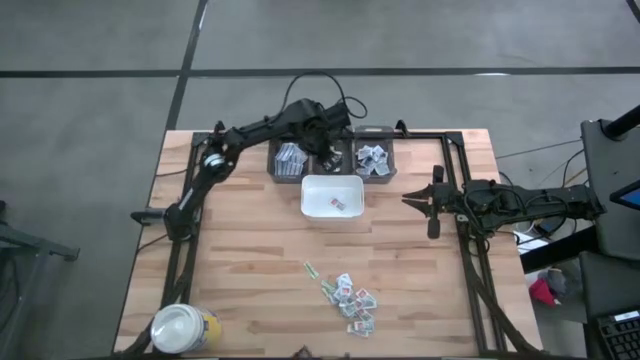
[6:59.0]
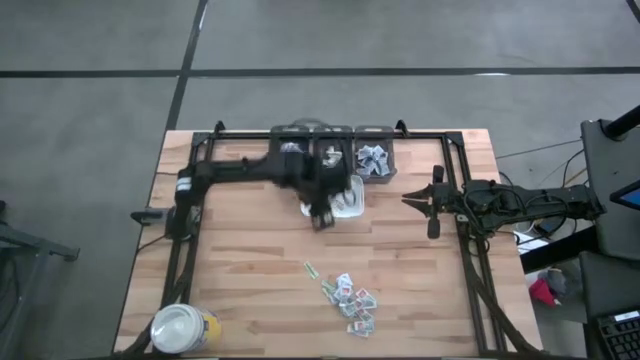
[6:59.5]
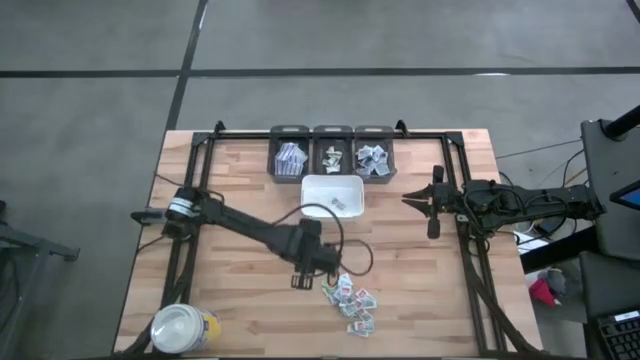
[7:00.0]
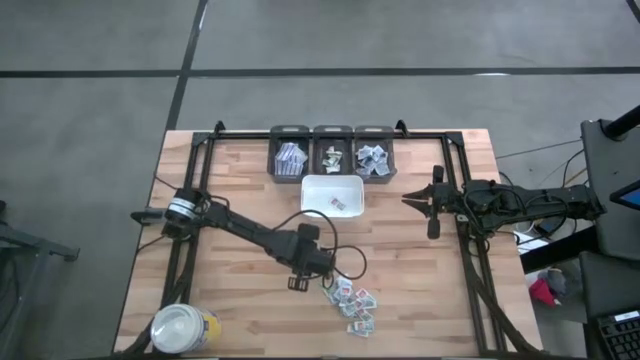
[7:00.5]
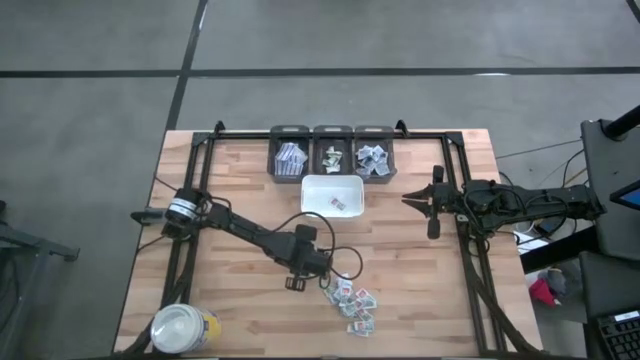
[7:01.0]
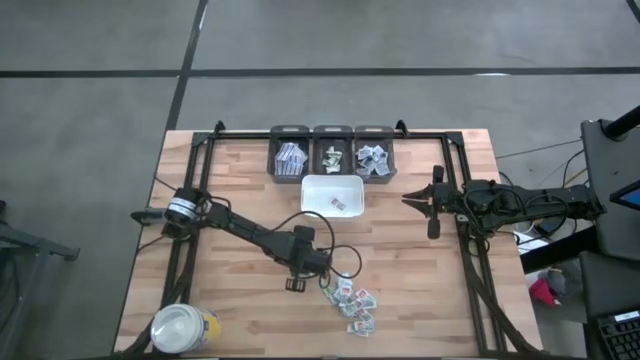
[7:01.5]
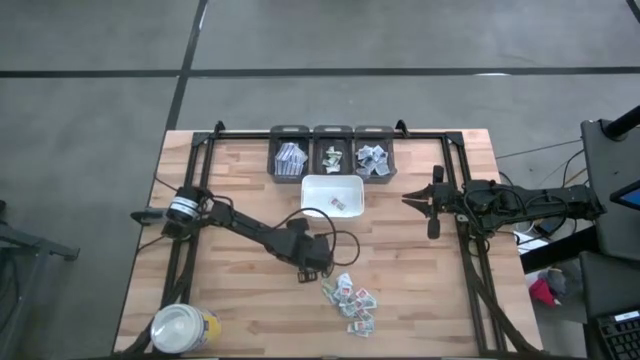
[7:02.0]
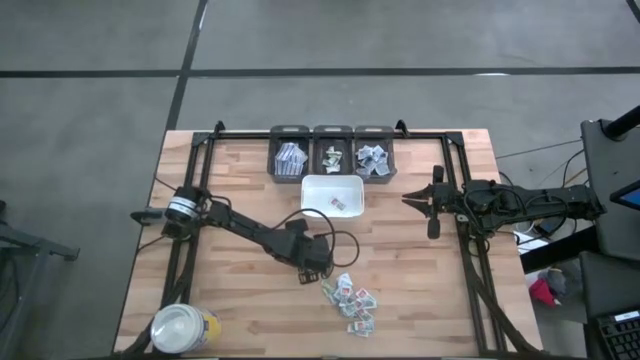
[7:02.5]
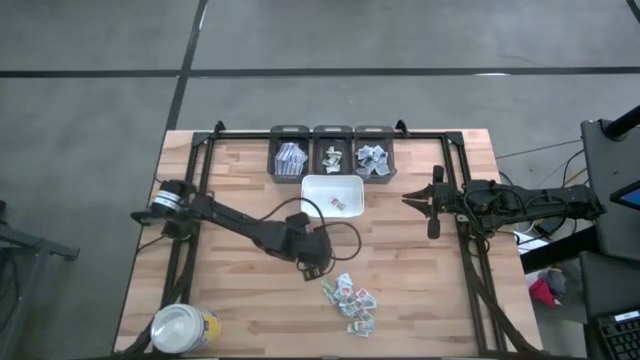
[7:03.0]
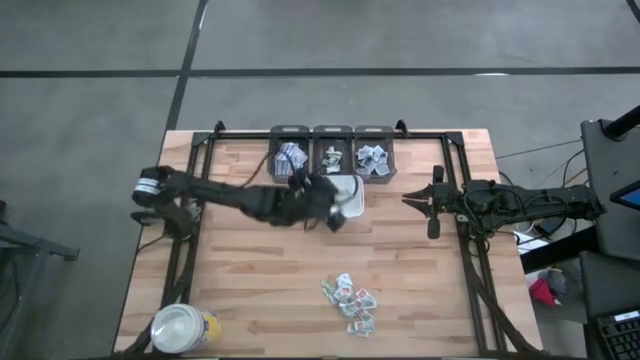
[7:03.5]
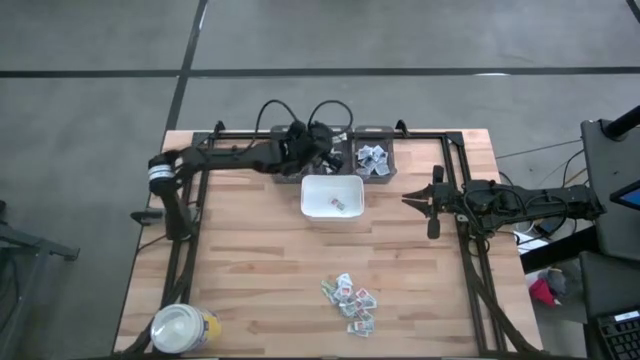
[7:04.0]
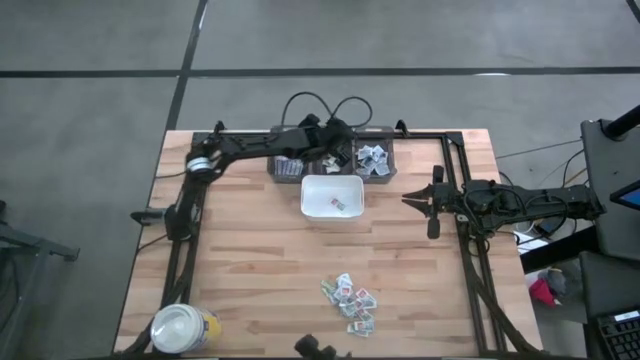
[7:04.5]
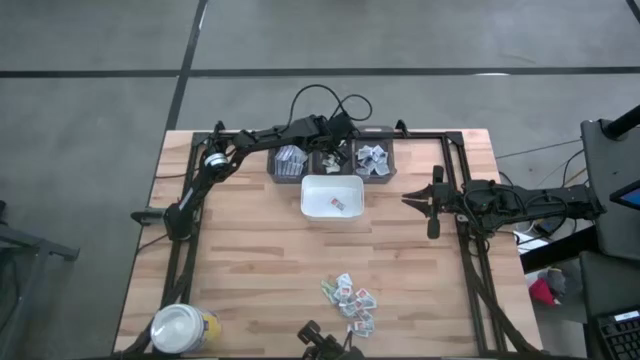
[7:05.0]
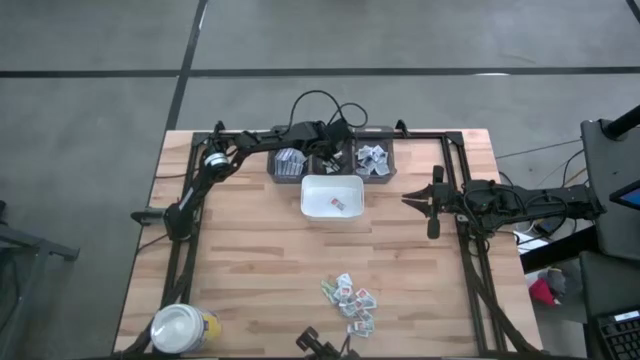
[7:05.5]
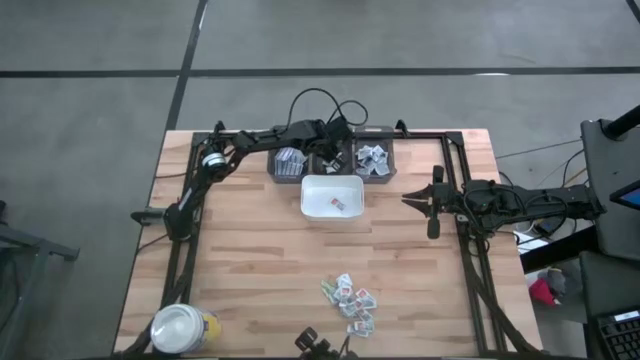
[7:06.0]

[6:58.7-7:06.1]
Task: Pick & Place First Aid Supplies
Put the green band aid into the middle black bin

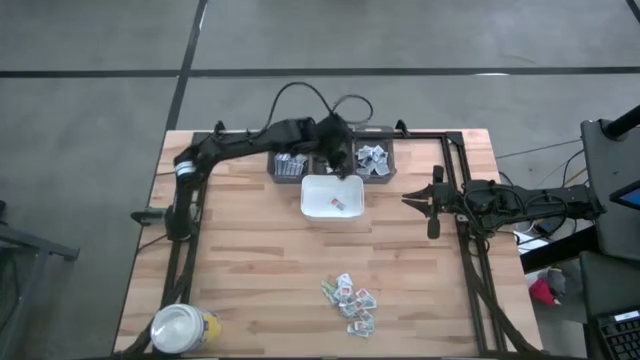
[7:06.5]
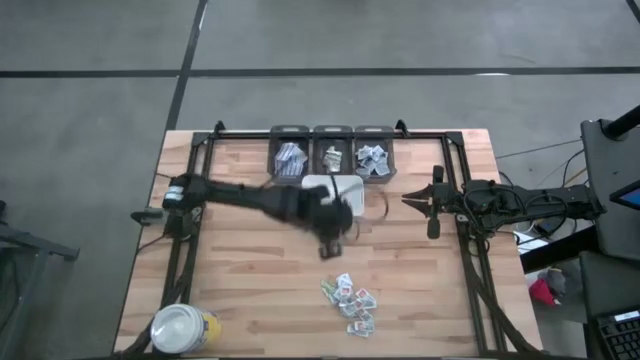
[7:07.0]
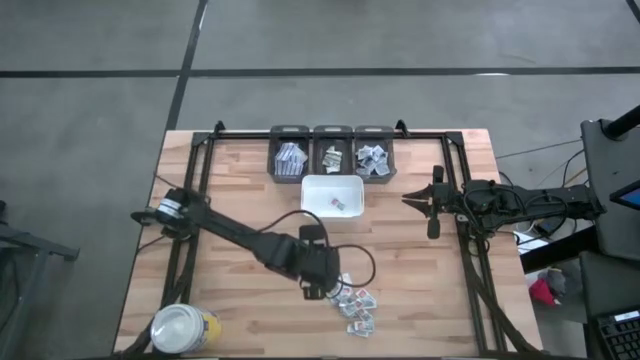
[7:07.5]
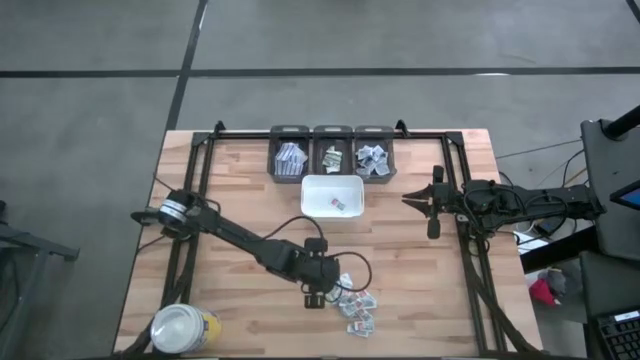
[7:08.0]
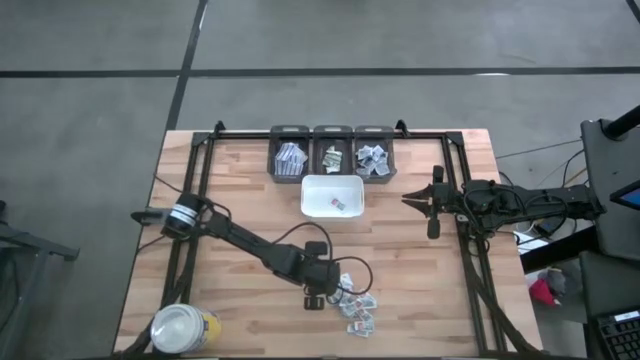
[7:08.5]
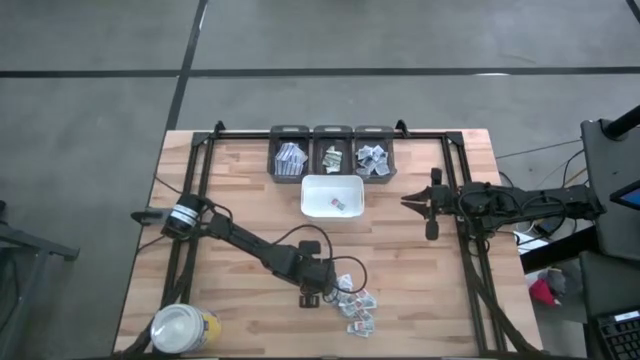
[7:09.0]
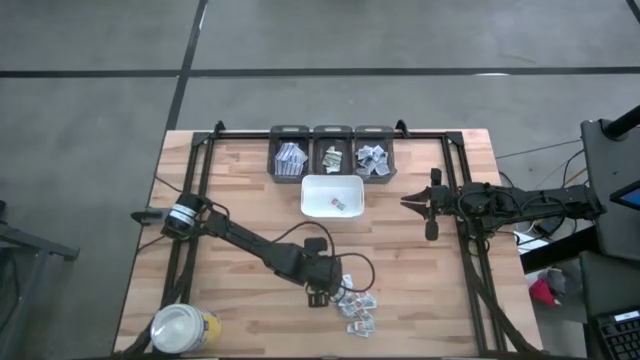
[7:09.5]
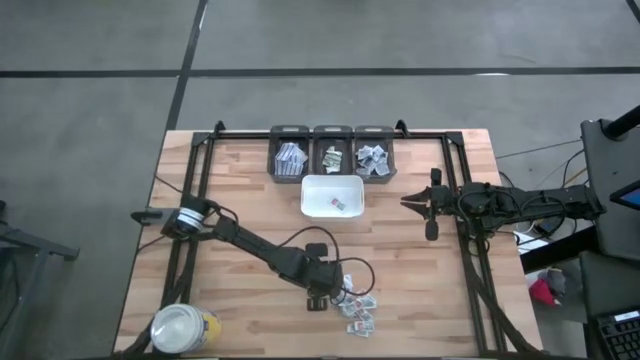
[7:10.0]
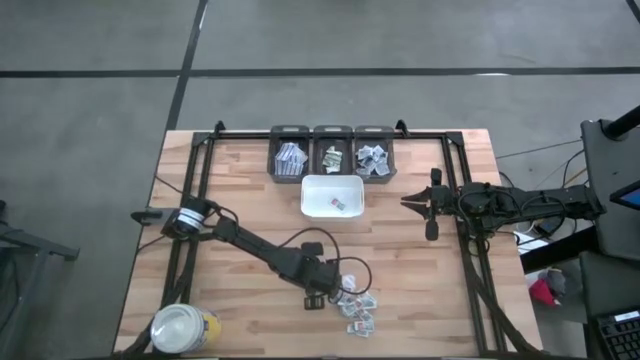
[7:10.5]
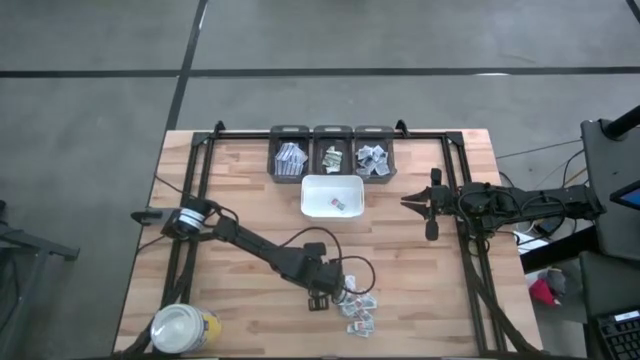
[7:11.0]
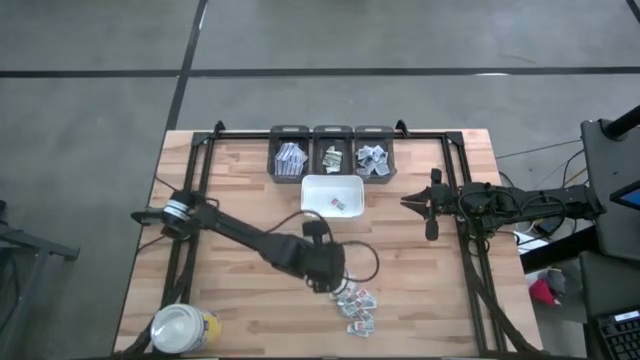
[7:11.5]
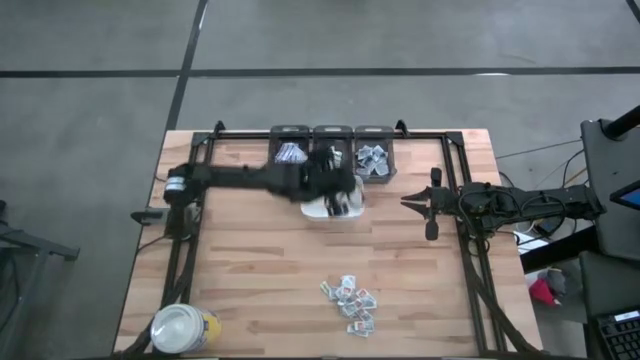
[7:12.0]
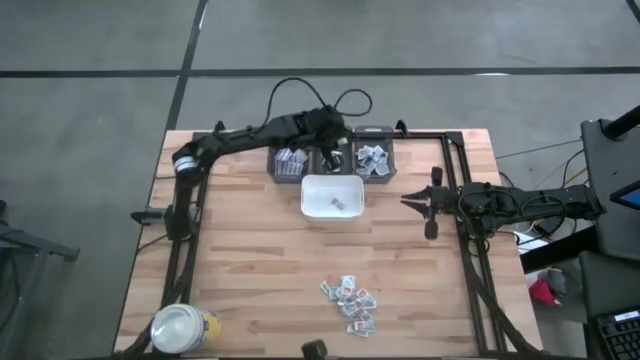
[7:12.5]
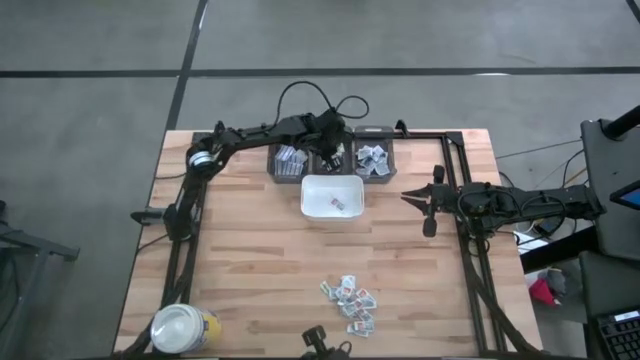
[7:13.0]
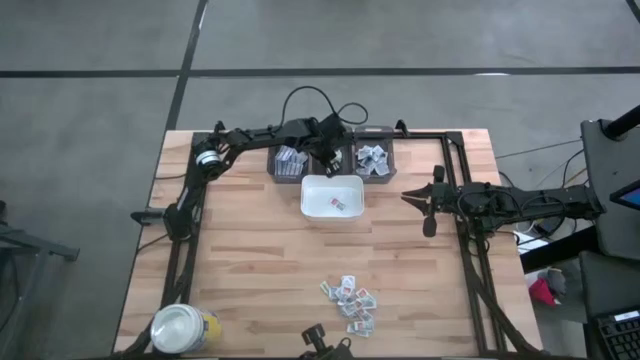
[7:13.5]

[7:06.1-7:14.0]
Put the green band aid into the middle black bin

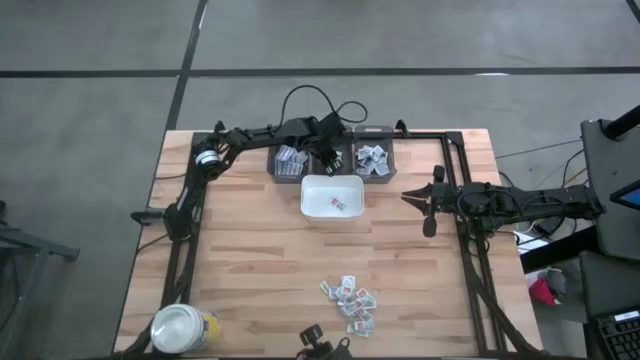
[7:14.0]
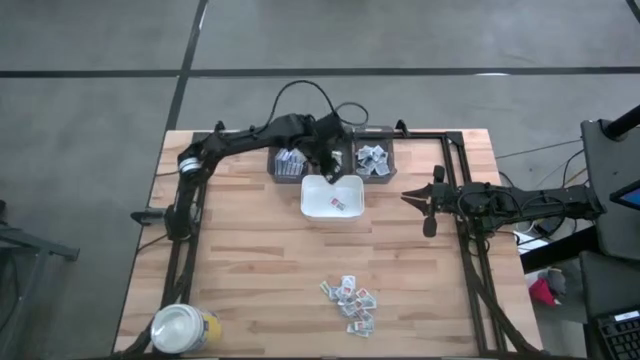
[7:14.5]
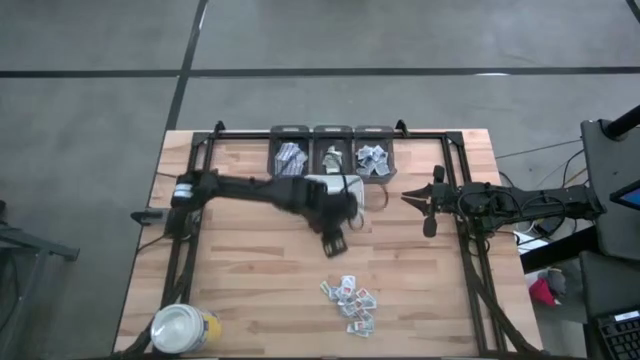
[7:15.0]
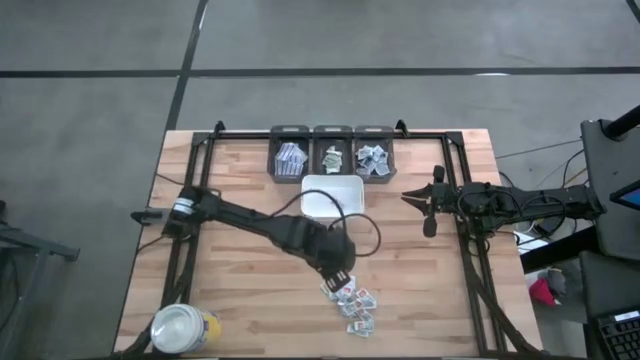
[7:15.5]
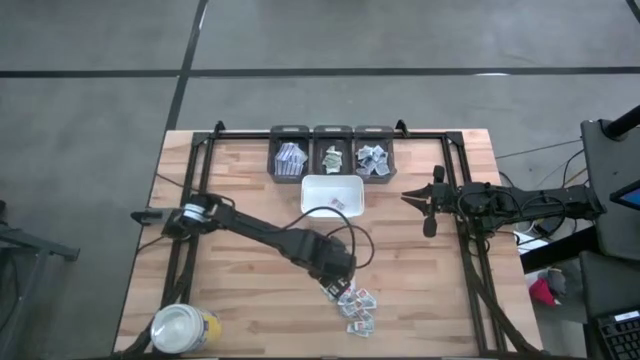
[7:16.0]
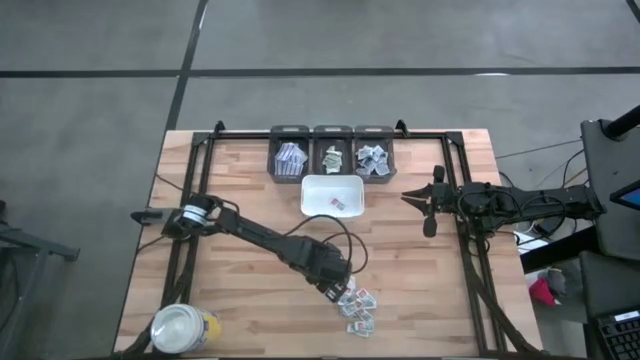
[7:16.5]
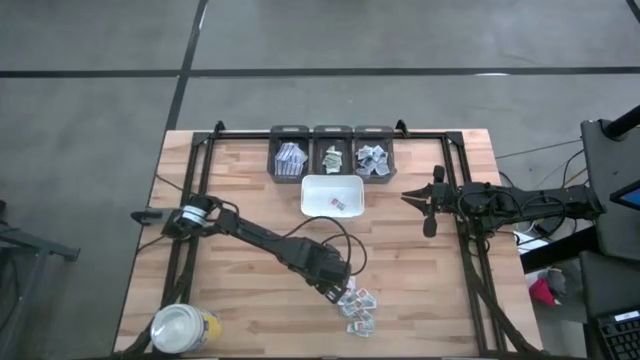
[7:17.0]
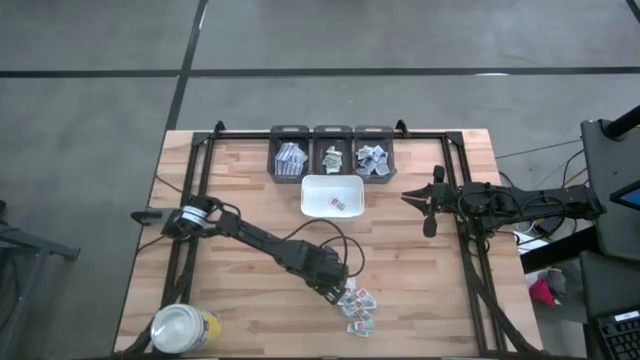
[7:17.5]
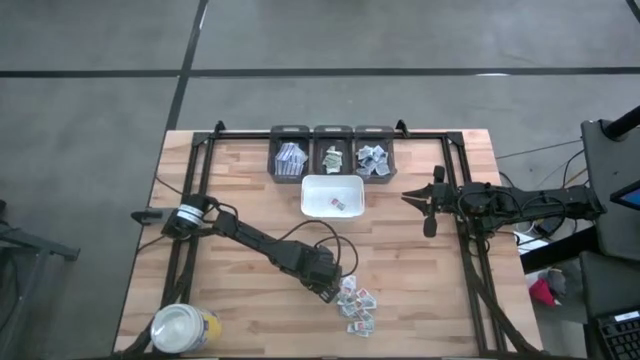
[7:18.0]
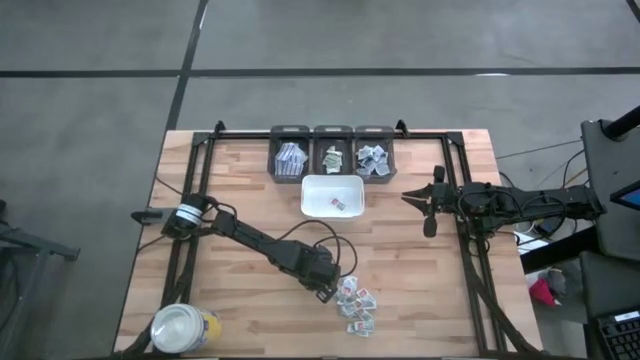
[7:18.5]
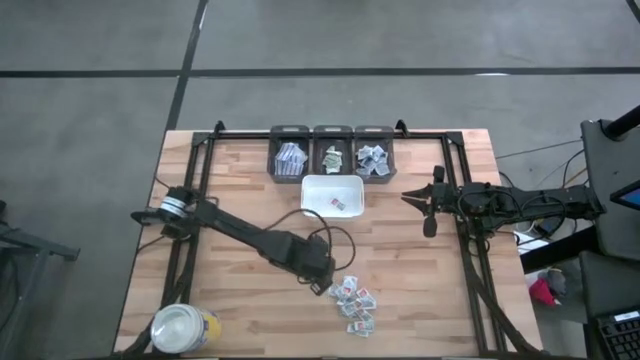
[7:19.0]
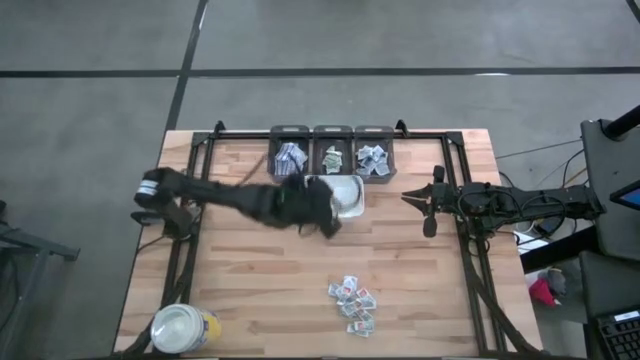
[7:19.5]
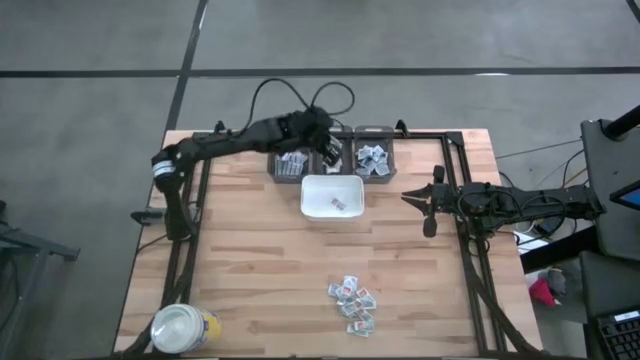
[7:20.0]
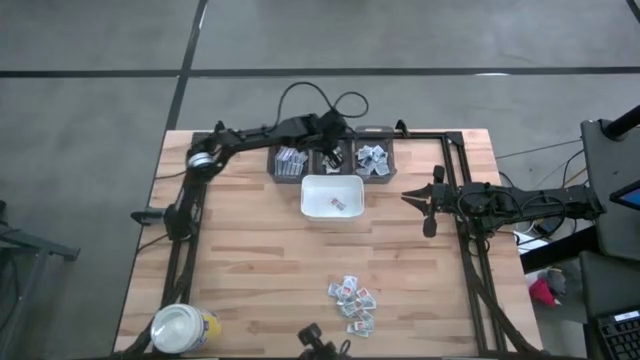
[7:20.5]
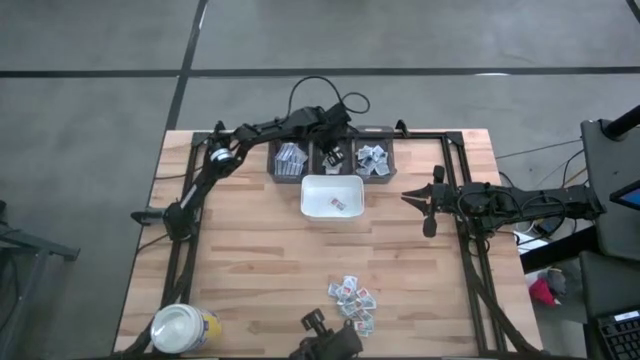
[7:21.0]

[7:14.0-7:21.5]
Put the green band aid into the middle black bin
